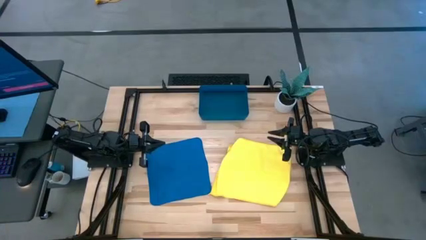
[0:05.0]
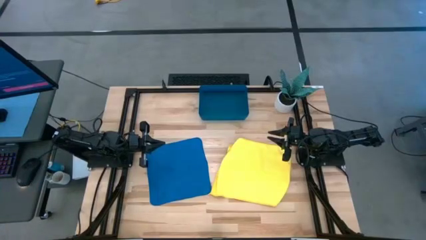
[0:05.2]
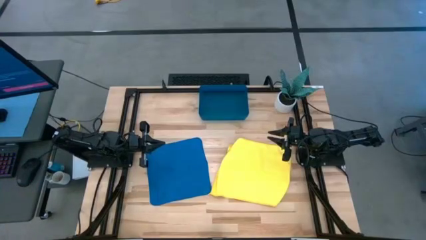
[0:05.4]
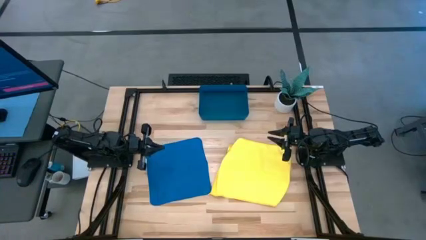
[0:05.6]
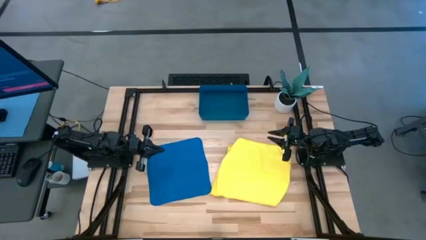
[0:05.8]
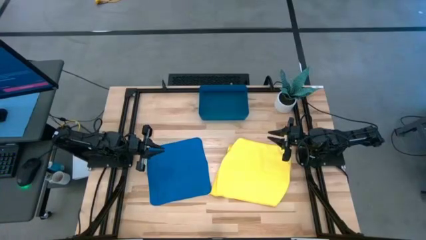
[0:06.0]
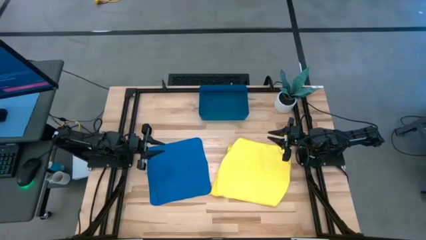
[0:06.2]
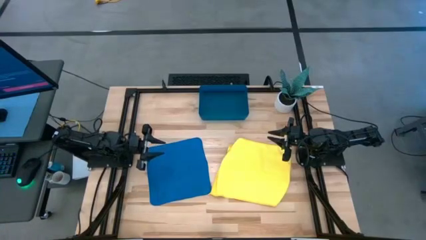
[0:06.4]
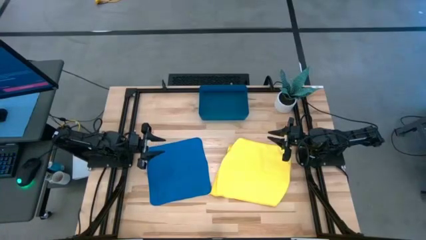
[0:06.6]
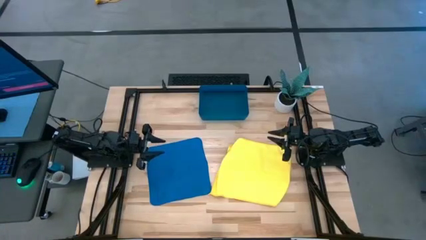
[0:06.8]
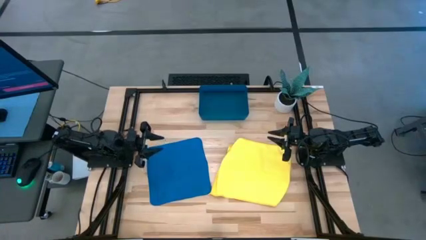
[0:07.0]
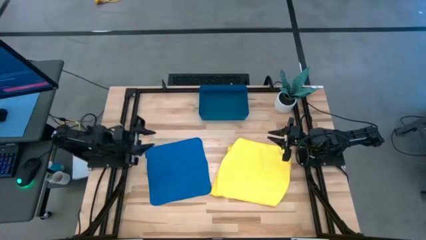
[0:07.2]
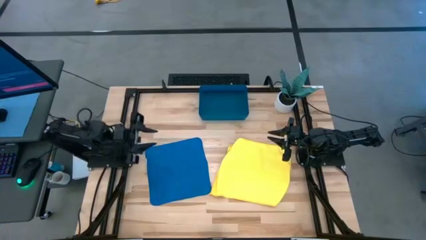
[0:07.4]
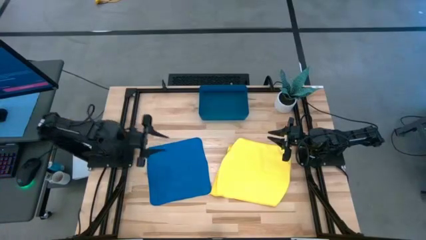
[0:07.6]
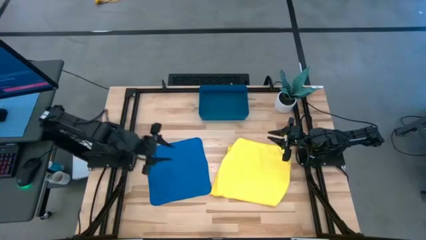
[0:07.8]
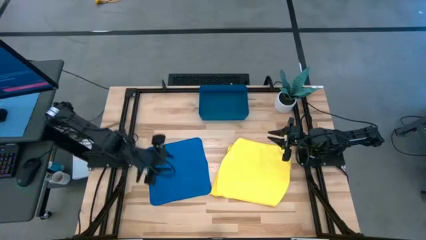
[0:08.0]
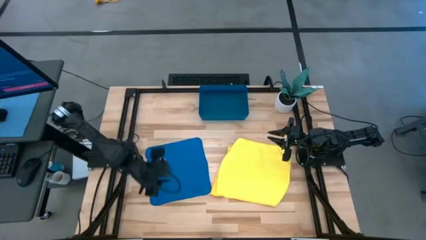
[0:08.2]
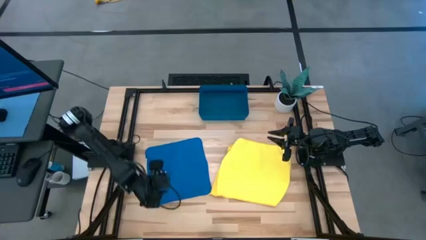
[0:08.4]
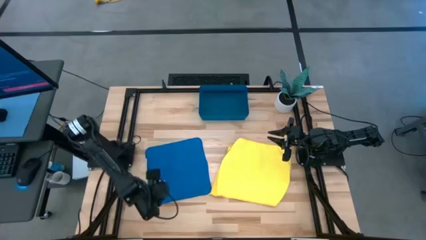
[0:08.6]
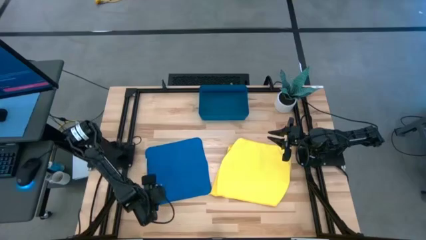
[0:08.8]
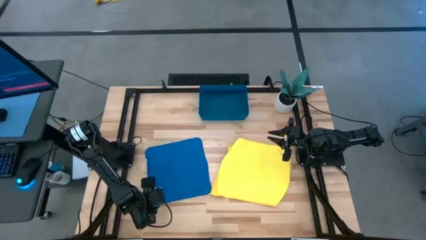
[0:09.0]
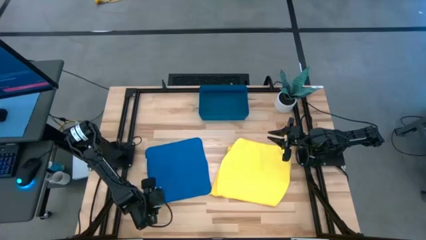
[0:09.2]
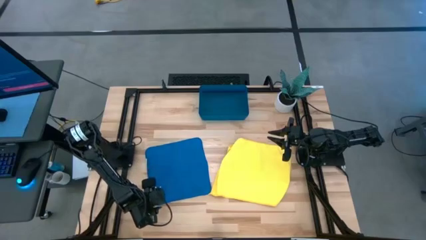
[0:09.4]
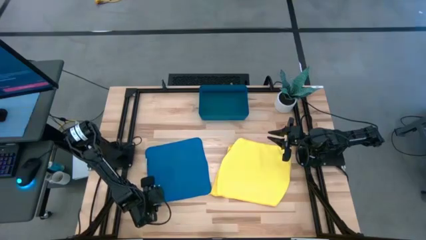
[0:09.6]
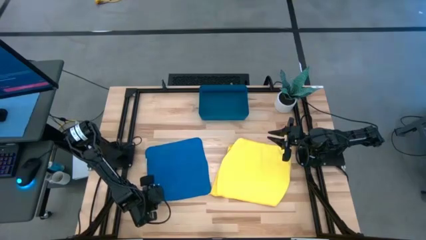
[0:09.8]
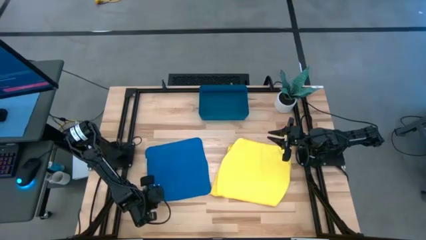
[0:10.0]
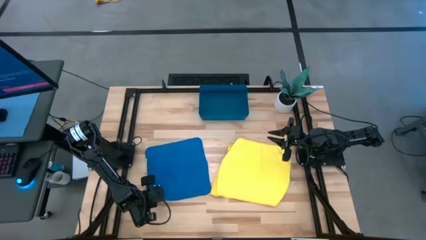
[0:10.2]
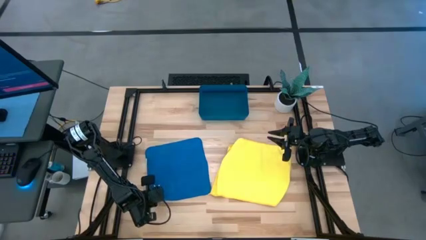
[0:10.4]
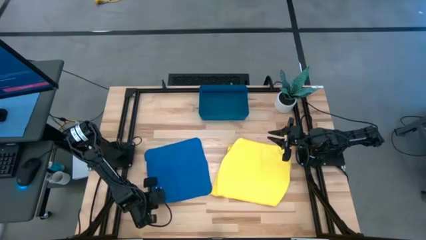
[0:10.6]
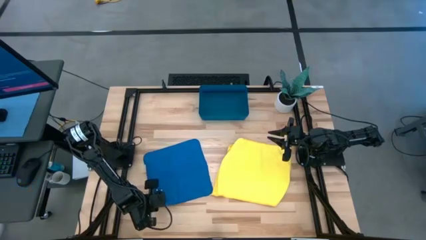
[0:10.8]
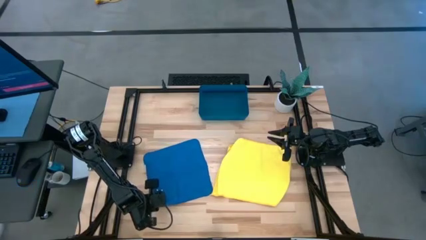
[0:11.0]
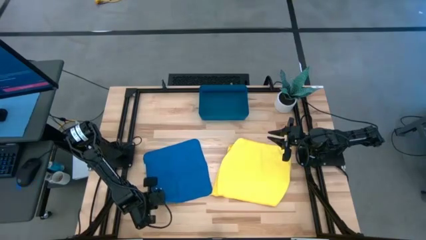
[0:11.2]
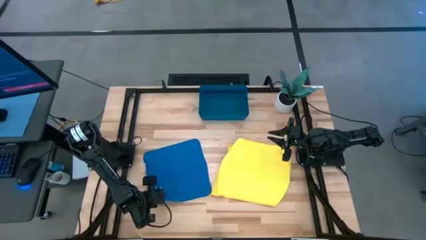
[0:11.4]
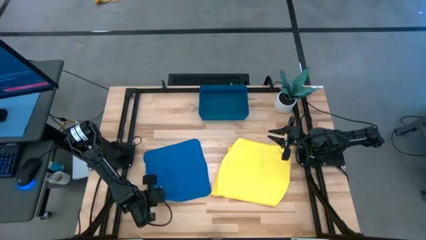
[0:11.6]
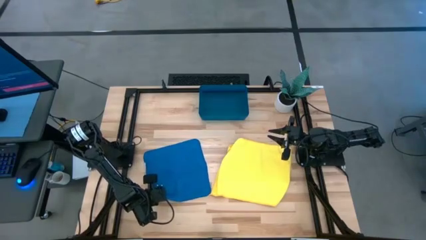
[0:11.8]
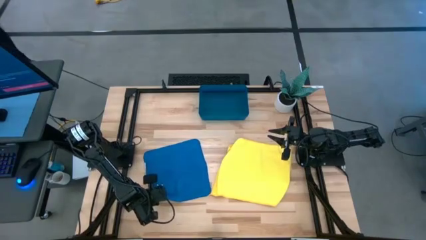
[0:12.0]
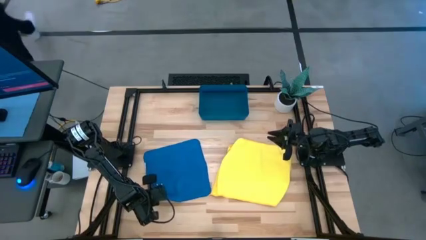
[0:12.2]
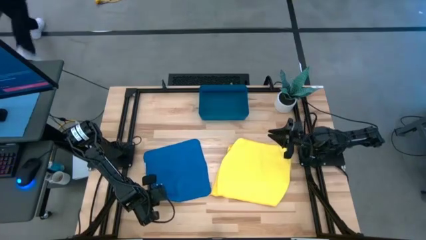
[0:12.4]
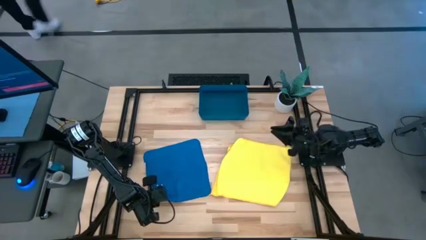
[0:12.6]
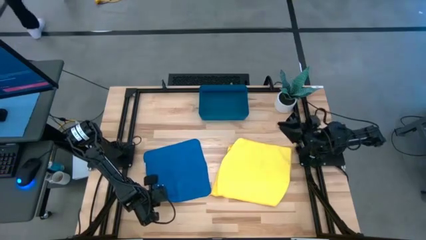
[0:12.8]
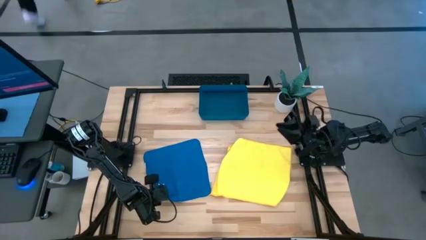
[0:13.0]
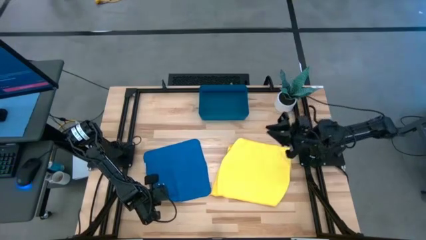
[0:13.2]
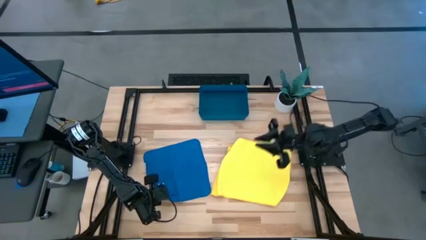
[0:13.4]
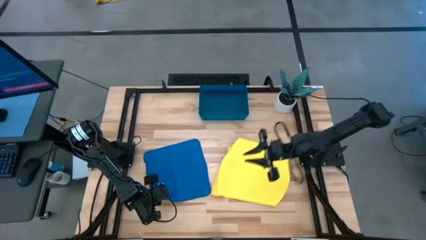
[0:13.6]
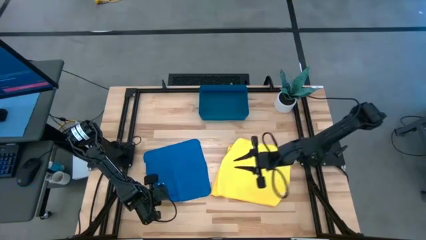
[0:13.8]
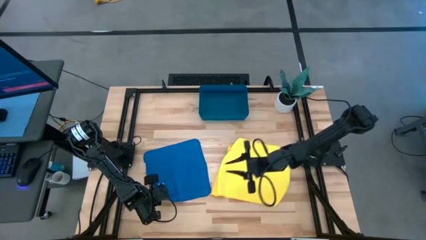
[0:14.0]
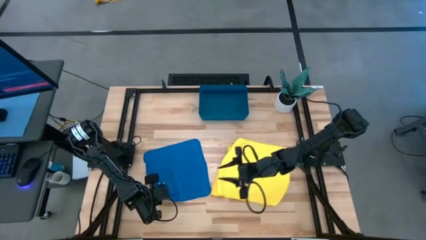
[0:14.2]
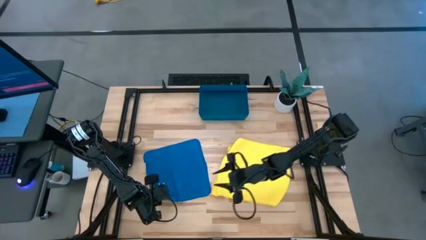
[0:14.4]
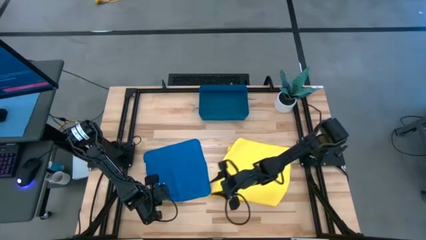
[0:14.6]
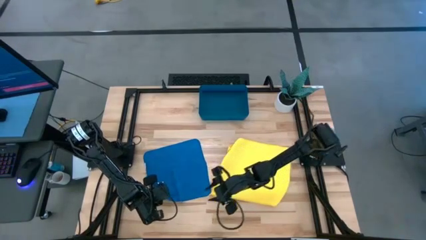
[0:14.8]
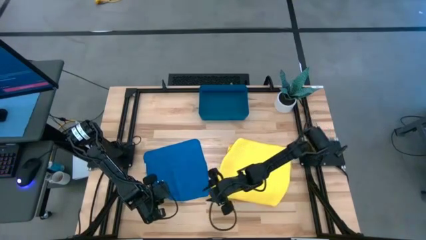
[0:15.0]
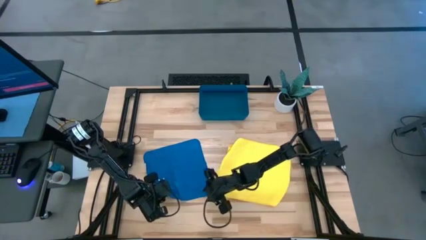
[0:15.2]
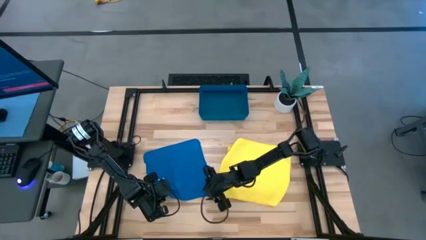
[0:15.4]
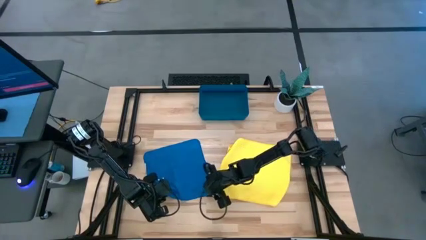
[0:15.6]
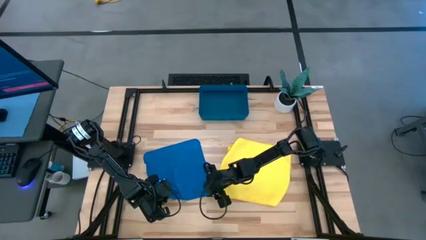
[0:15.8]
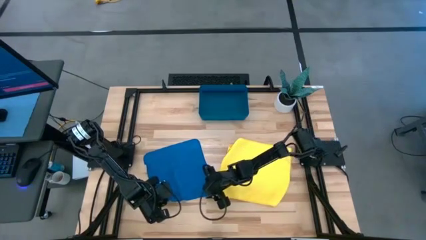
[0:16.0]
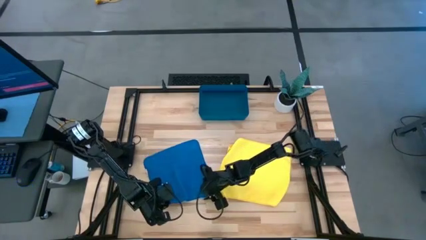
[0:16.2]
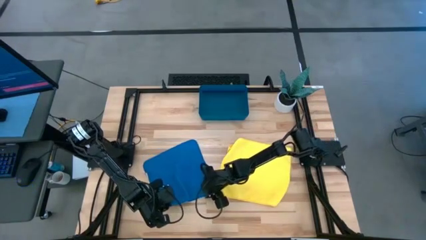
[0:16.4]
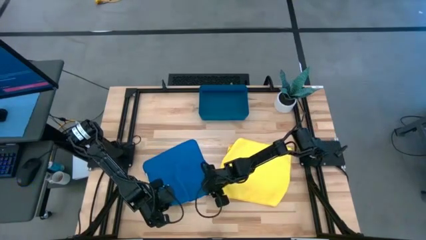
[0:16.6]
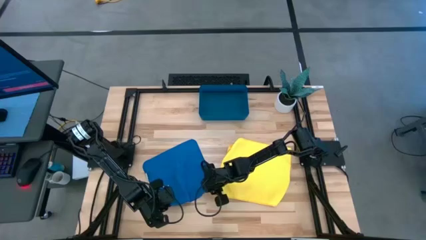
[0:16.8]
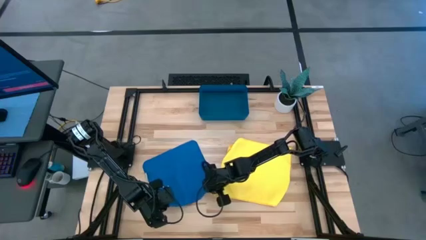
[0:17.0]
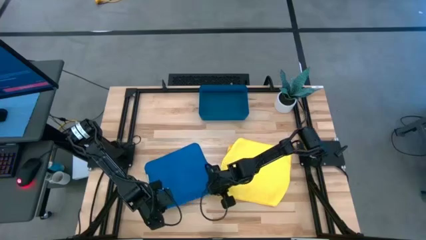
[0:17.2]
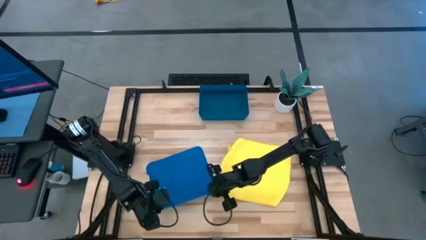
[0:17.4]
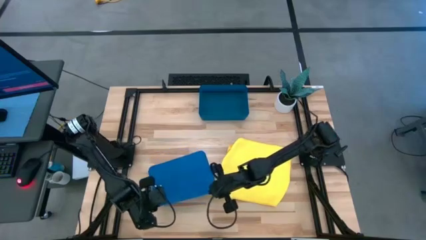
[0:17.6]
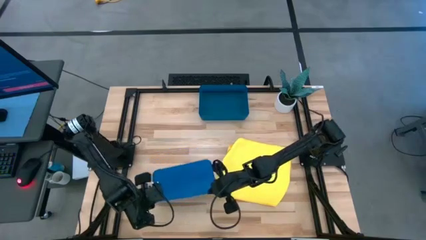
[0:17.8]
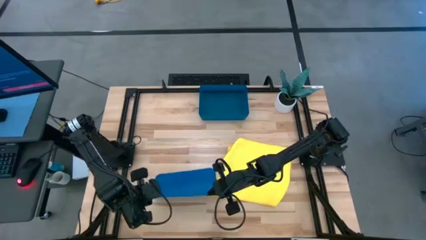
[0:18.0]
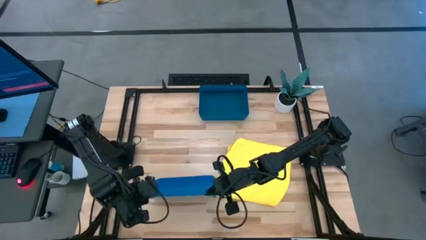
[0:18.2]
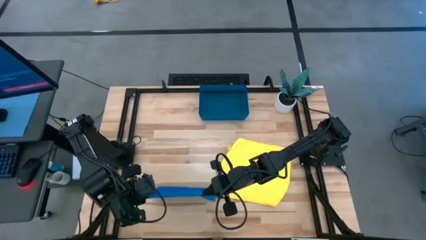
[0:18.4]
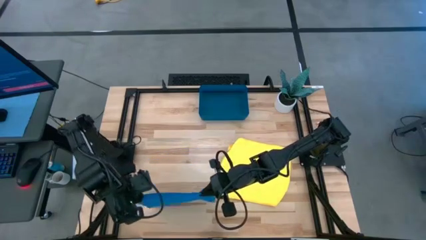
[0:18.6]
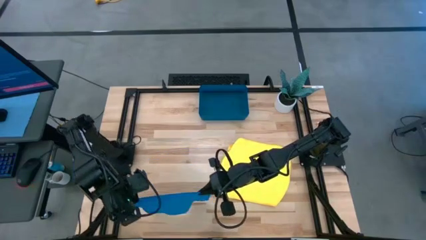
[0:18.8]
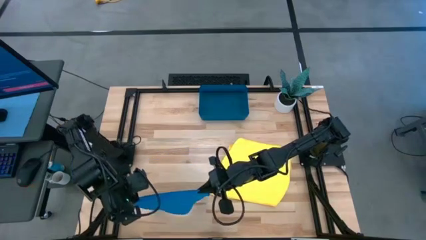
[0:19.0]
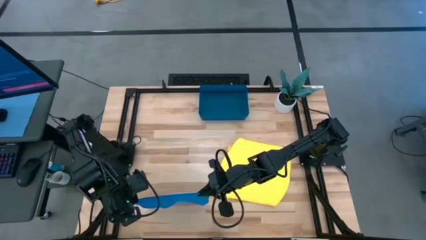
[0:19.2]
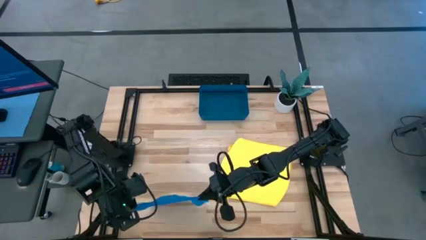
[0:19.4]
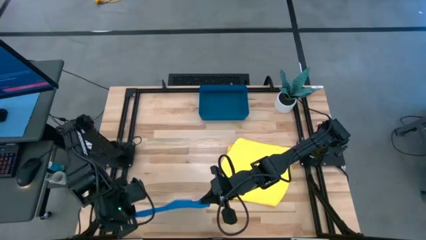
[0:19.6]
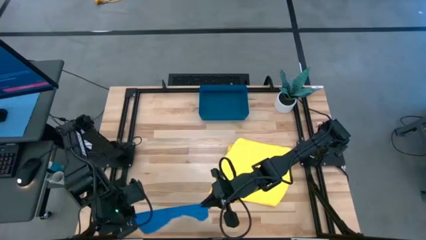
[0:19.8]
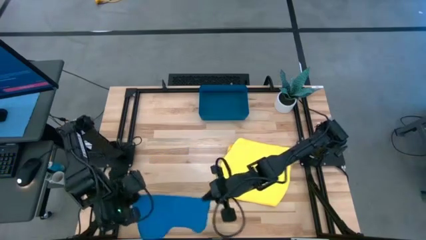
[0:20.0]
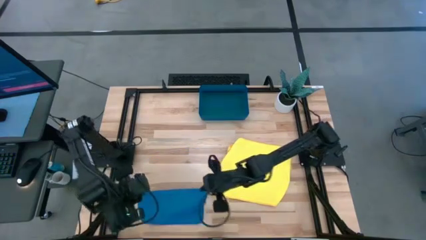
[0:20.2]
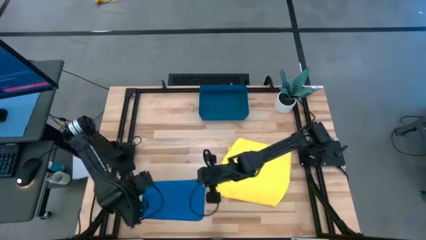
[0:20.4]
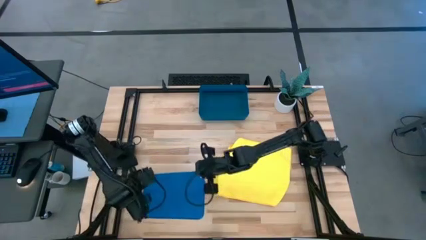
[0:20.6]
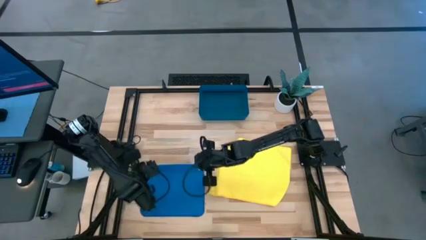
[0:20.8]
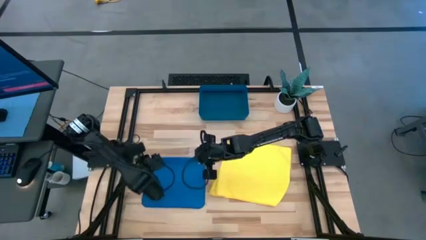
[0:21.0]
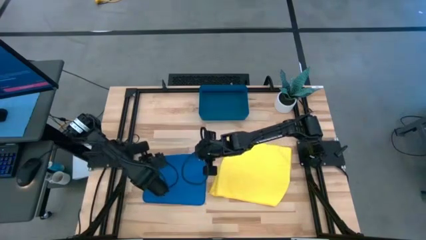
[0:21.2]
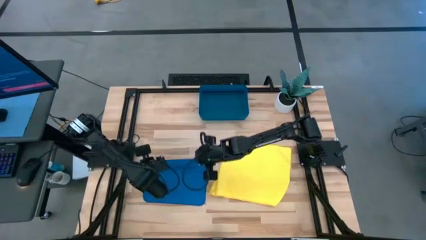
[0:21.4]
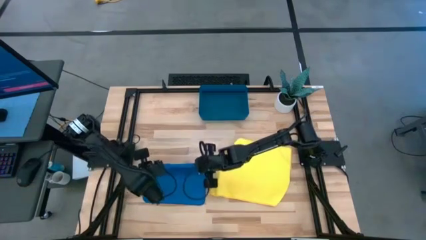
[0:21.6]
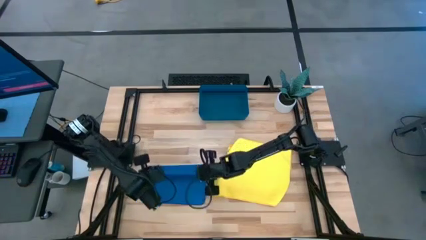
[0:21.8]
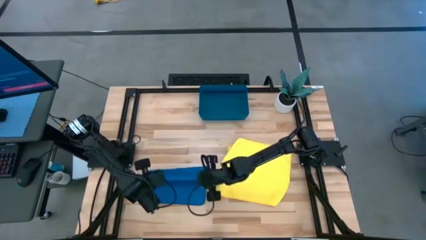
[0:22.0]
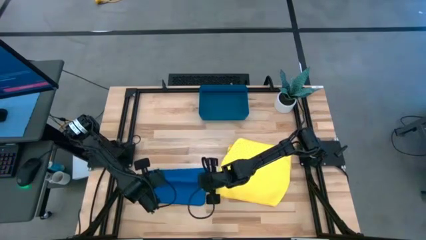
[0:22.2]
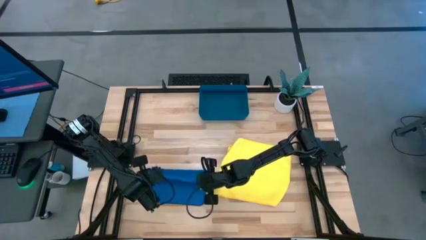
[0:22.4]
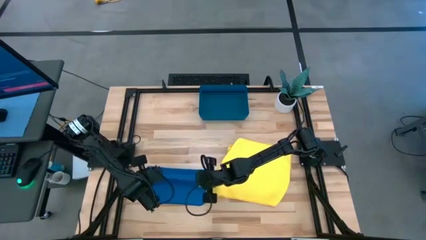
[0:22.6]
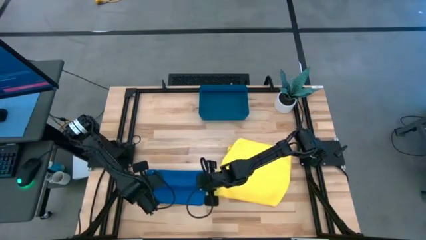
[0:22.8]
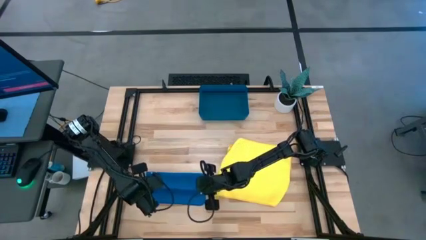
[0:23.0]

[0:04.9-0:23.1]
Task: Roll microfiber towels into tight, uniform cylinder then place into a basket
Roll the blue microfiber cloth
